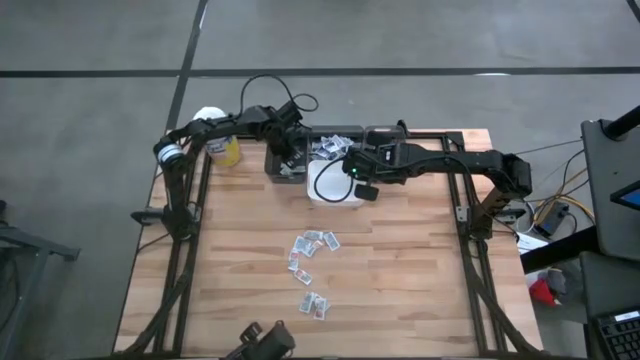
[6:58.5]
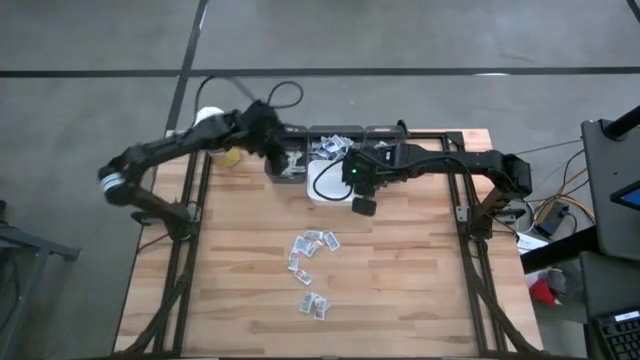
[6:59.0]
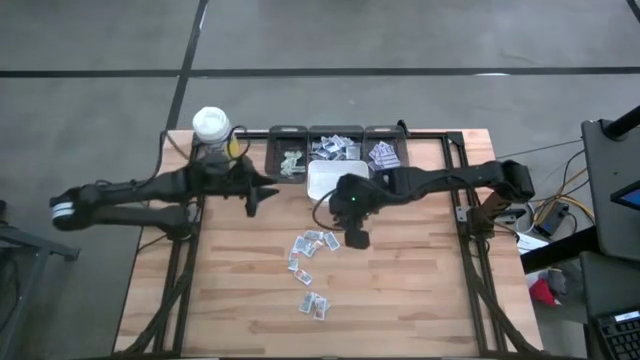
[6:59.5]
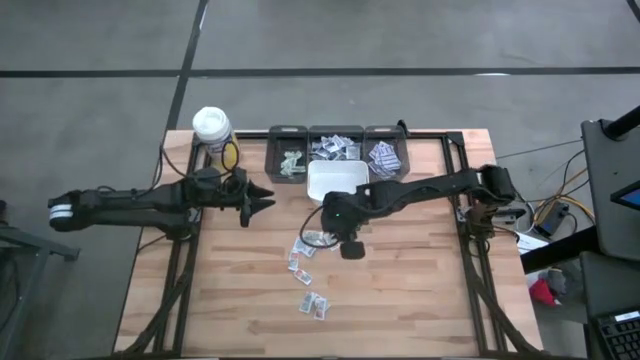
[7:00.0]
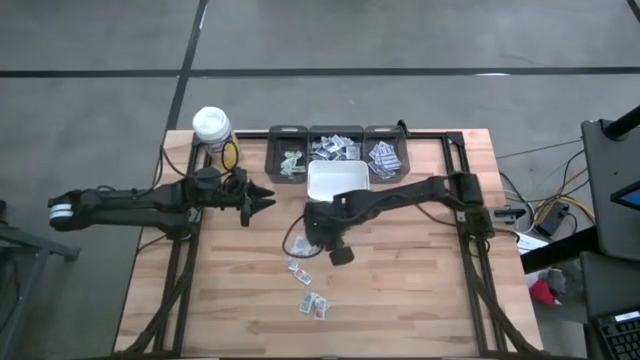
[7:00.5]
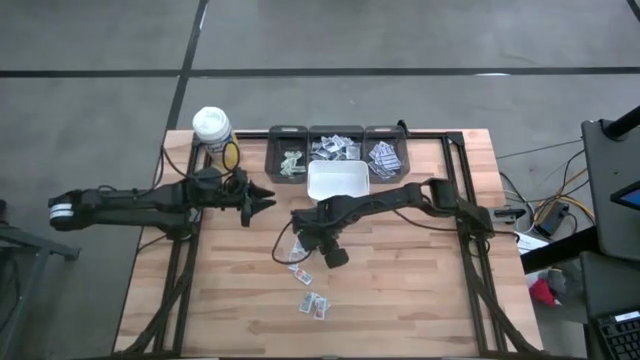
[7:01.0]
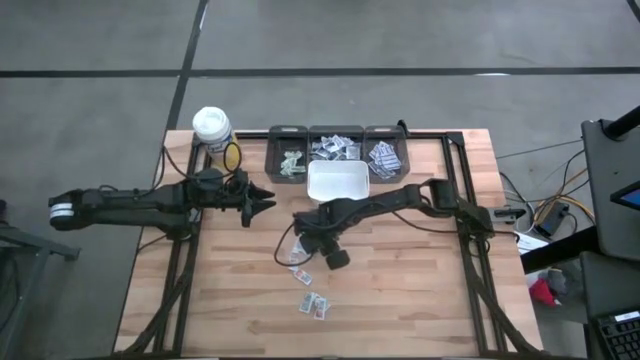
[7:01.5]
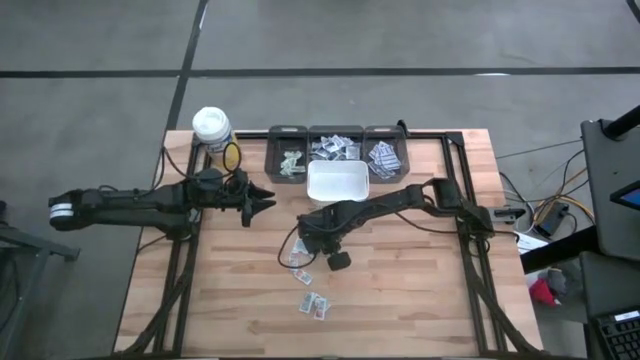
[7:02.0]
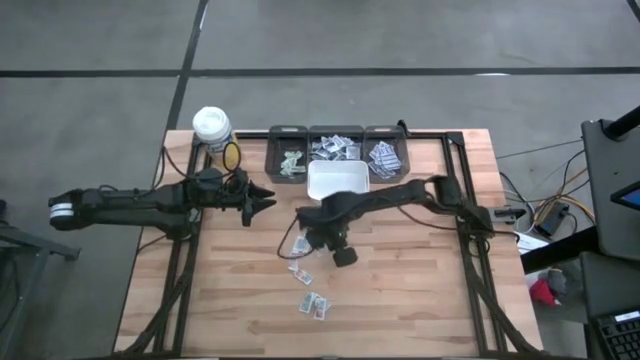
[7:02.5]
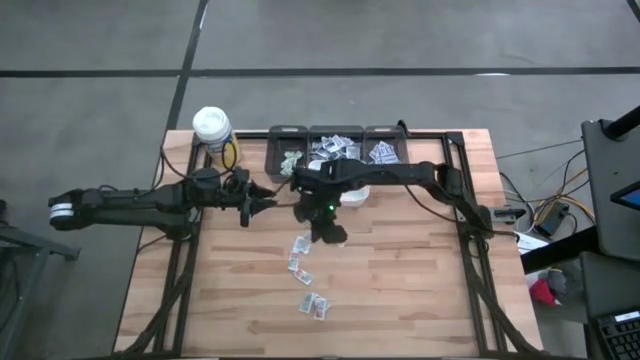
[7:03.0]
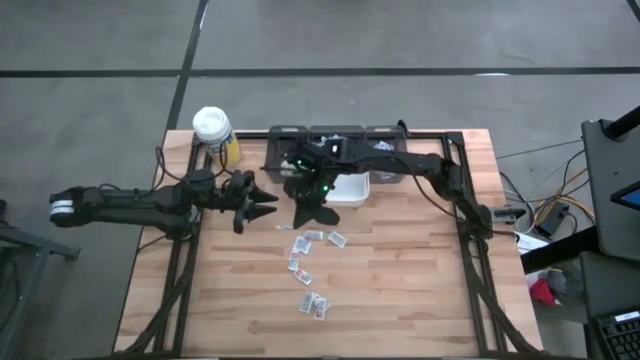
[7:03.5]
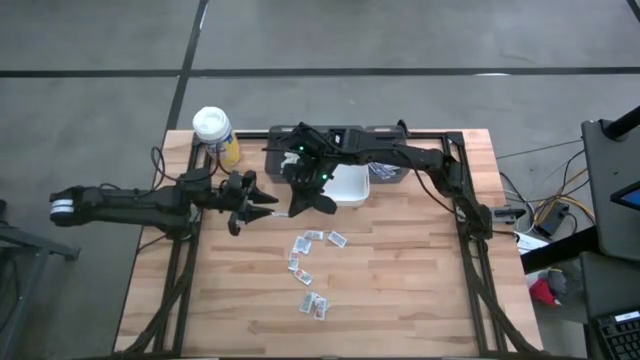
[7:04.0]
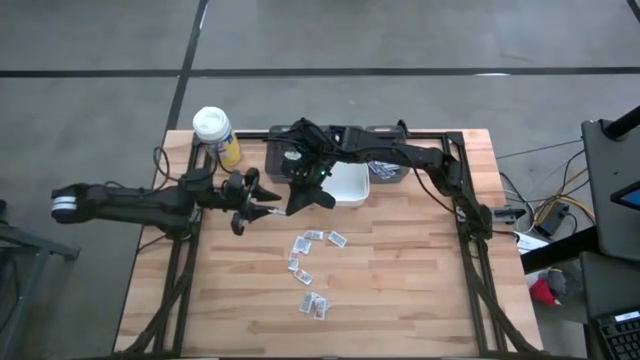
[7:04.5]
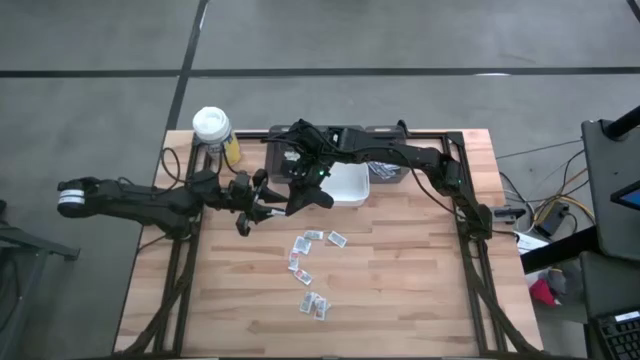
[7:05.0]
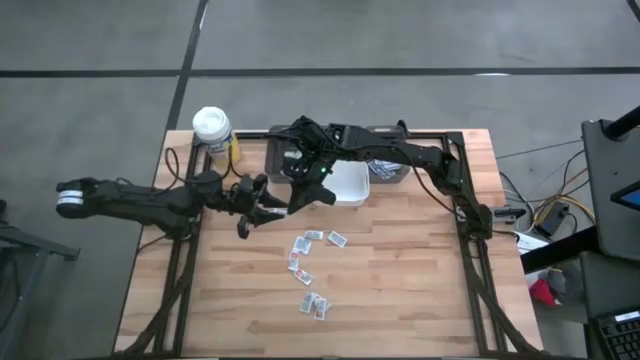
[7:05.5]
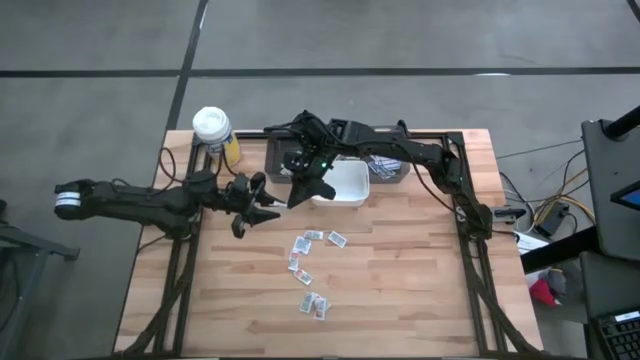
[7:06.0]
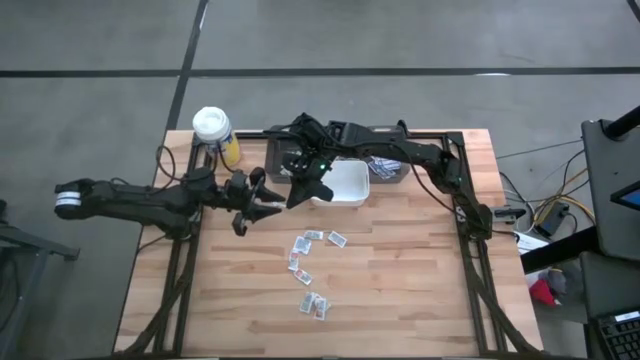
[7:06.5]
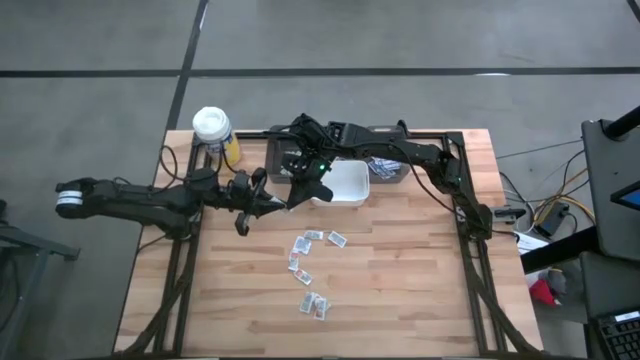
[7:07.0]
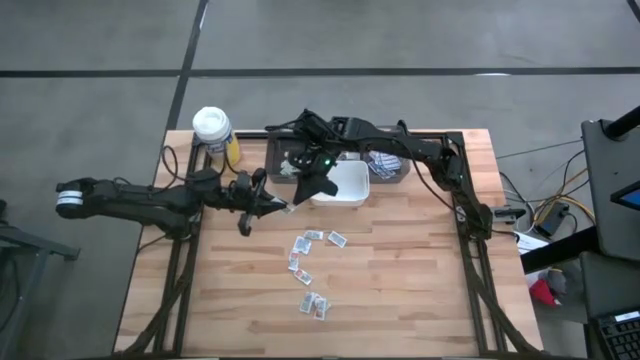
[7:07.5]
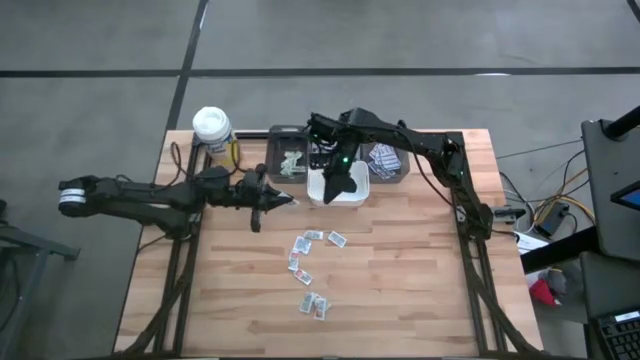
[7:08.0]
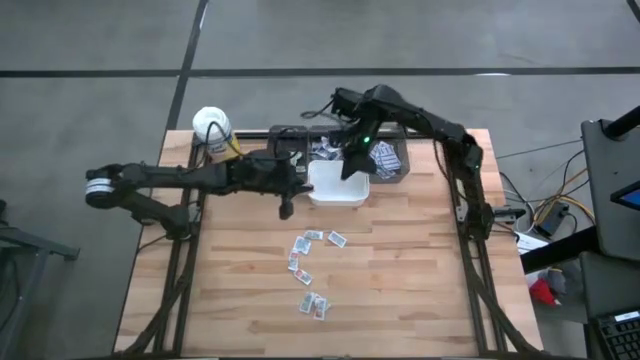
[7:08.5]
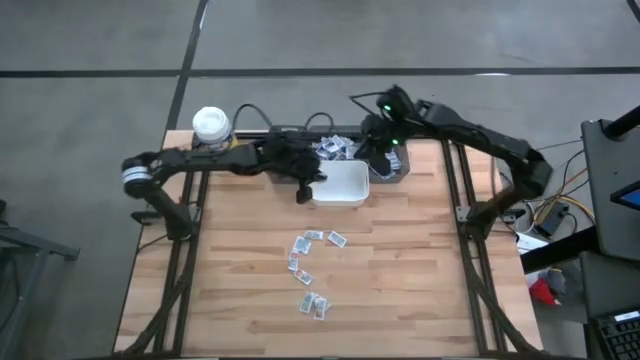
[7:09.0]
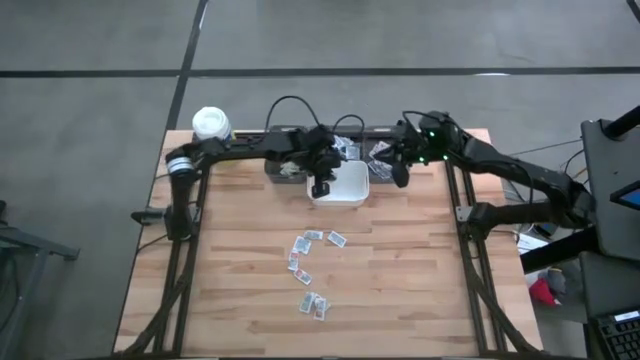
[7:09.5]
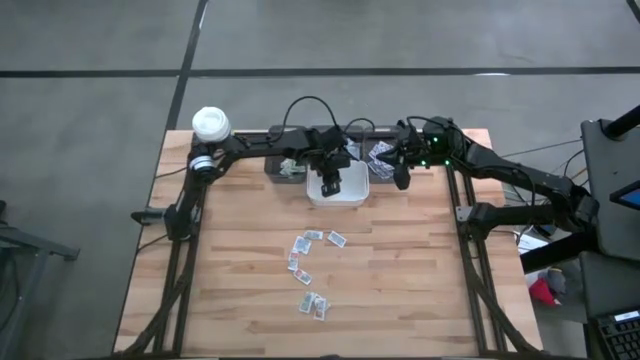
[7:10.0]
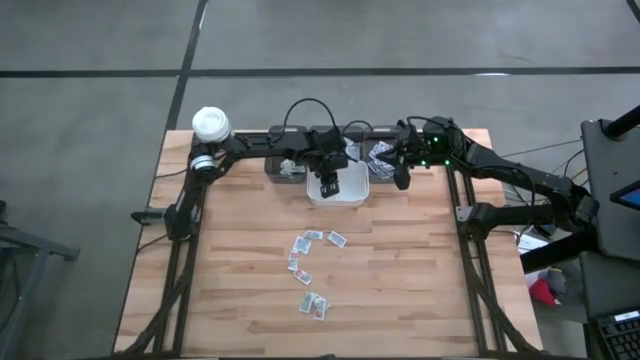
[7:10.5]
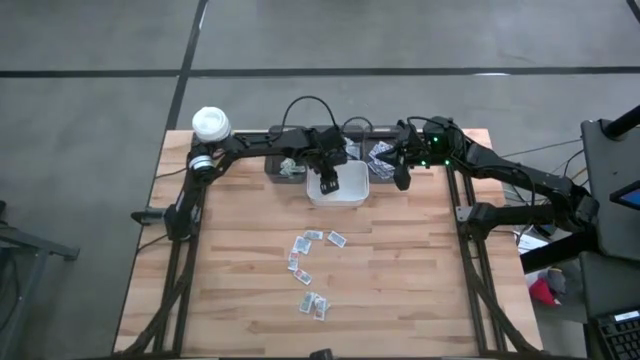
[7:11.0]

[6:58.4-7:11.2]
Task: Pick & Place First Aid Supplies
Put the ointment pack into the white bin

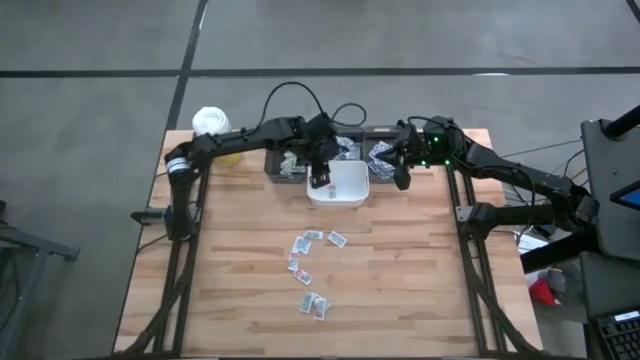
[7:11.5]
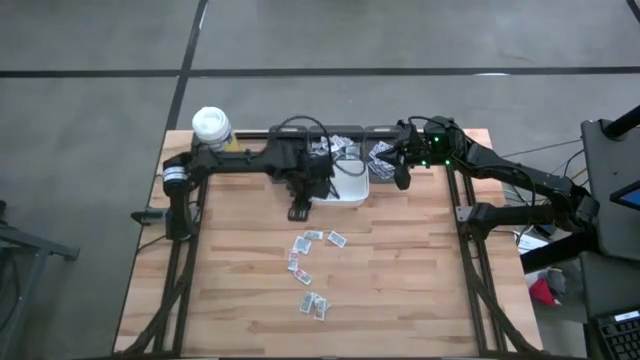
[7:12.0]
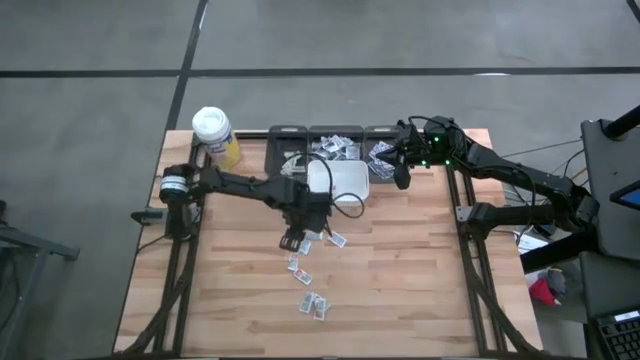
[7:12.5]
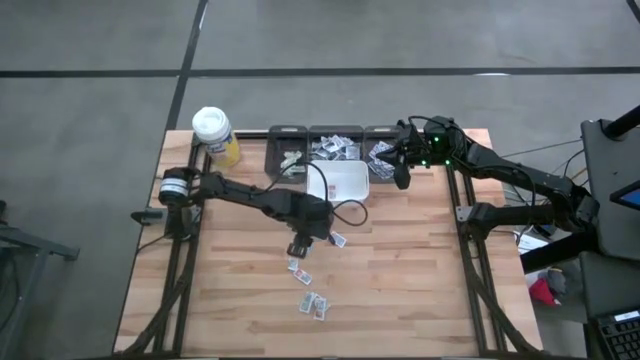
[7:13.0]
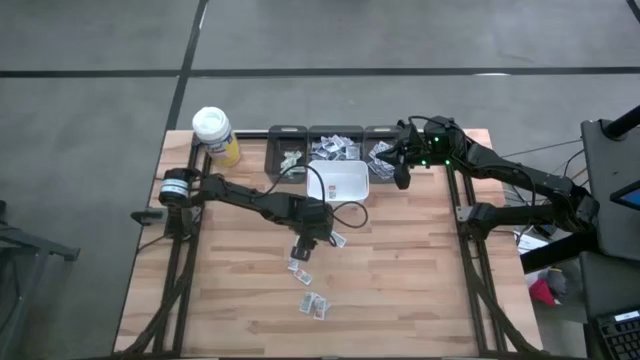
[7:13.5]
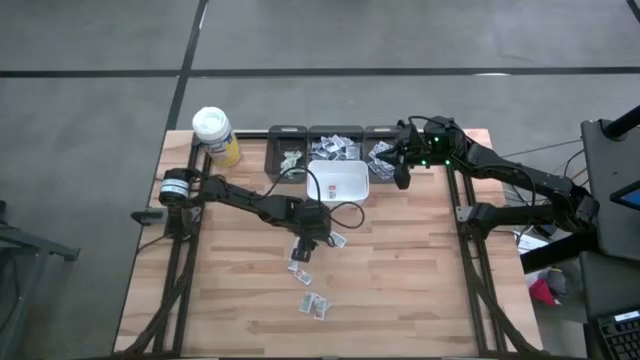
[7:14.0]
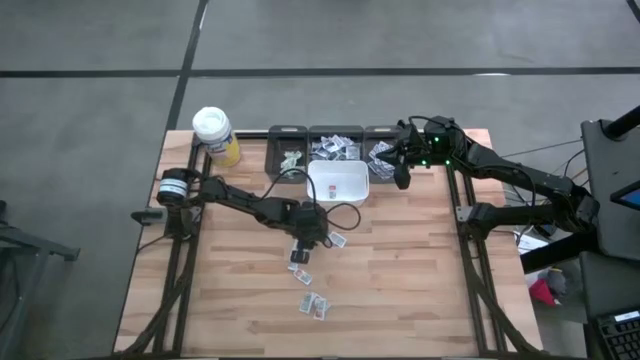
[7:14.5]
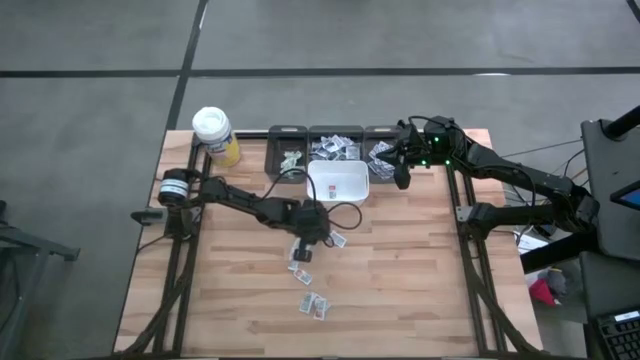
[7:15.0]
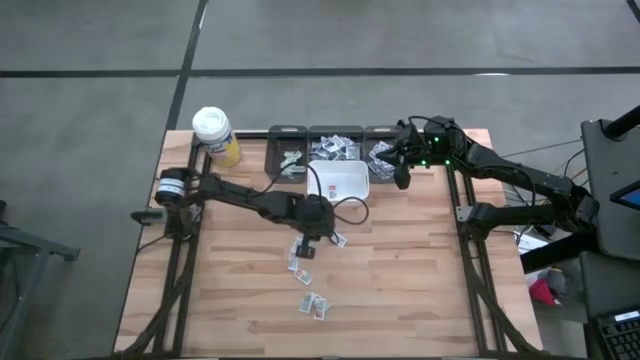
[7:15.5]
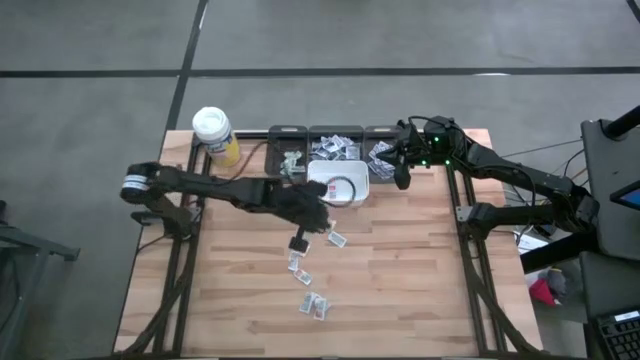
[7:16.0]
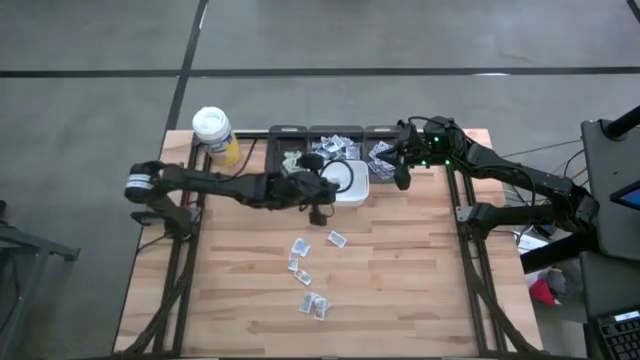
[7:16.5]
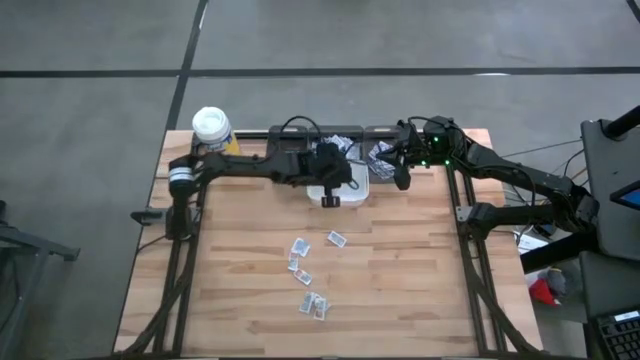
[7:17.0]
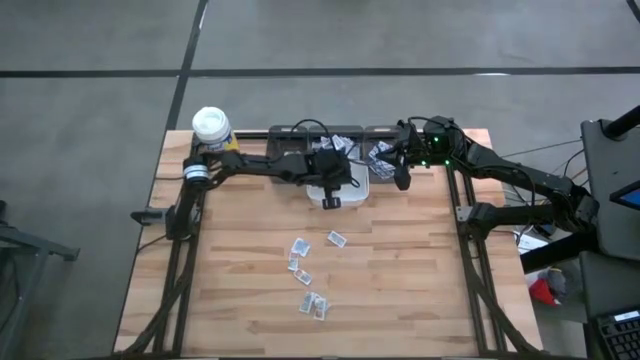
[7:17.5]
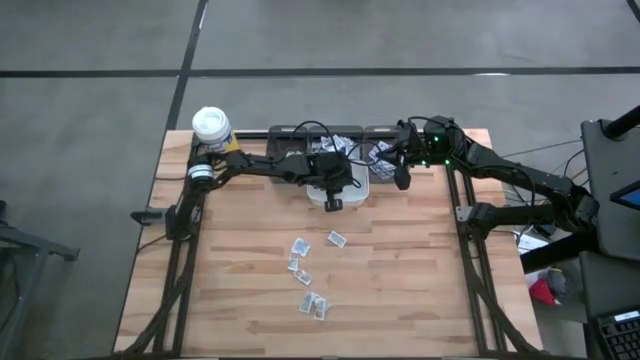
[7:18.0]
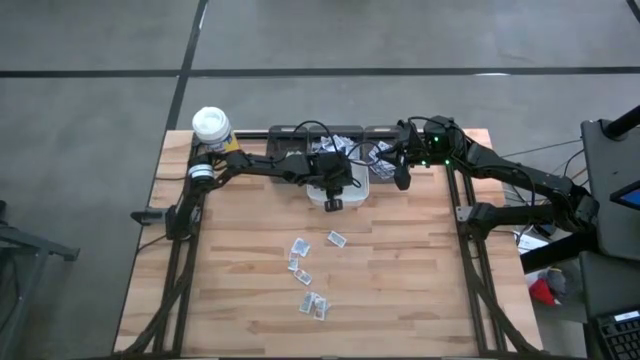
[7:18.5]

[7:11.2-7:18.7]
Put the ointment pack into the white bin
